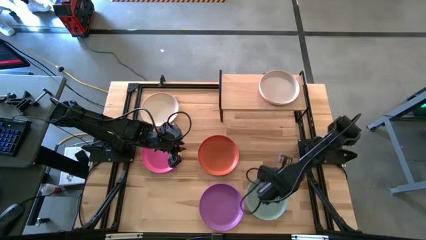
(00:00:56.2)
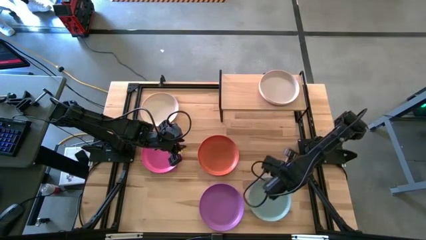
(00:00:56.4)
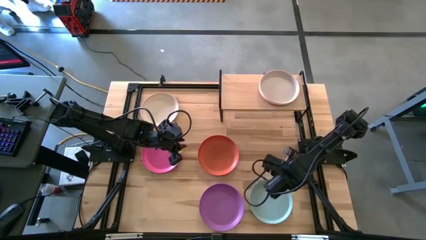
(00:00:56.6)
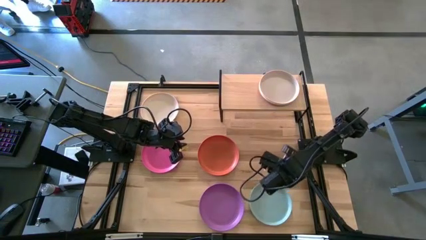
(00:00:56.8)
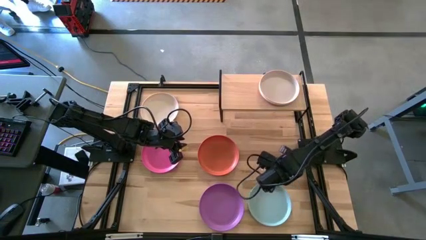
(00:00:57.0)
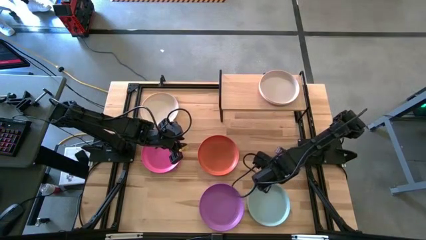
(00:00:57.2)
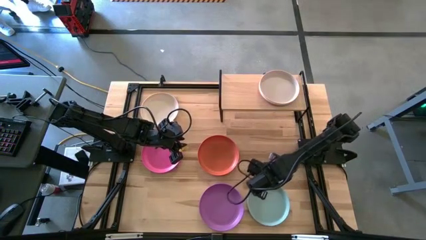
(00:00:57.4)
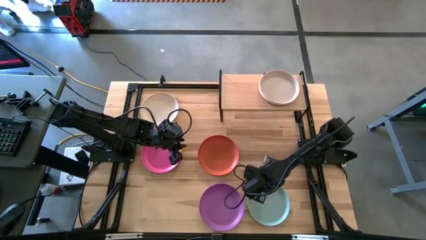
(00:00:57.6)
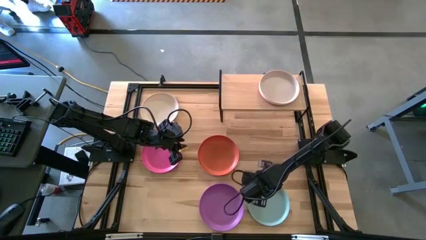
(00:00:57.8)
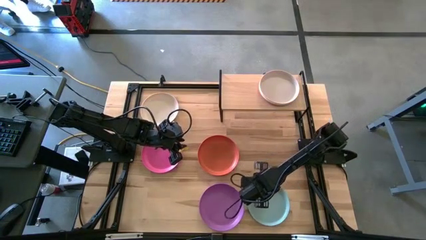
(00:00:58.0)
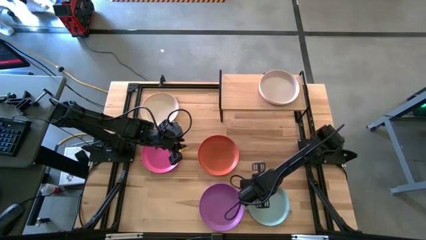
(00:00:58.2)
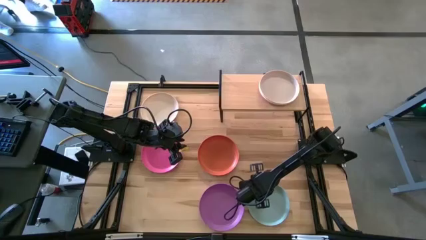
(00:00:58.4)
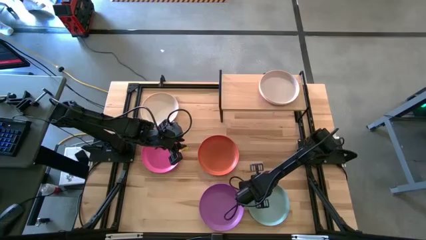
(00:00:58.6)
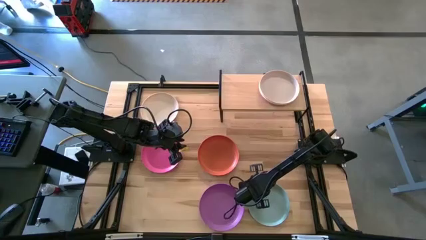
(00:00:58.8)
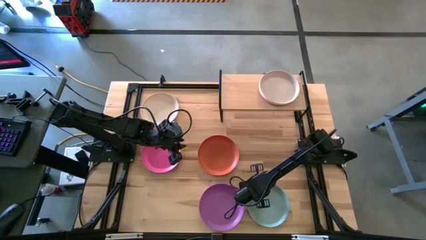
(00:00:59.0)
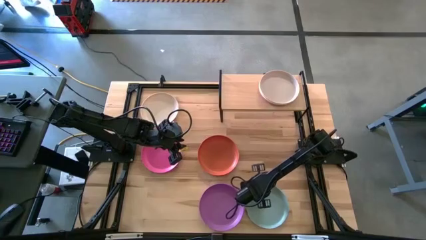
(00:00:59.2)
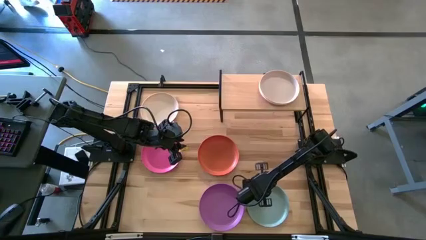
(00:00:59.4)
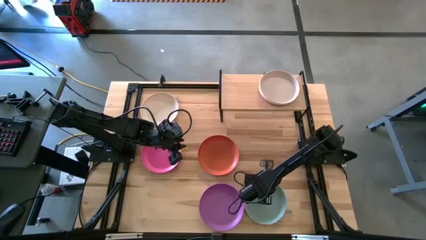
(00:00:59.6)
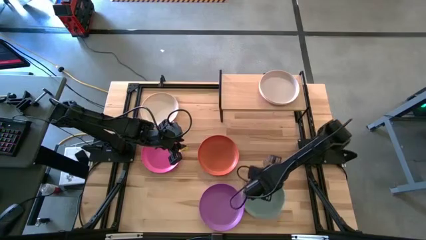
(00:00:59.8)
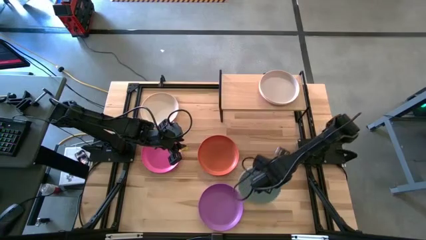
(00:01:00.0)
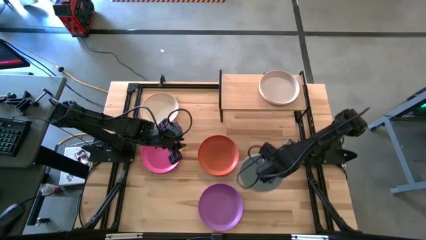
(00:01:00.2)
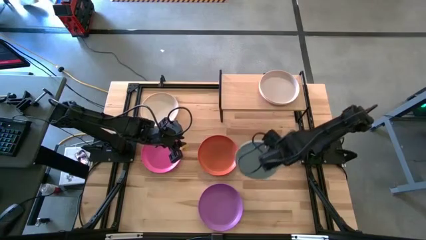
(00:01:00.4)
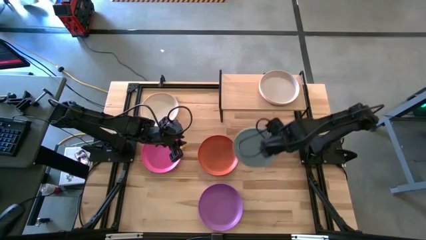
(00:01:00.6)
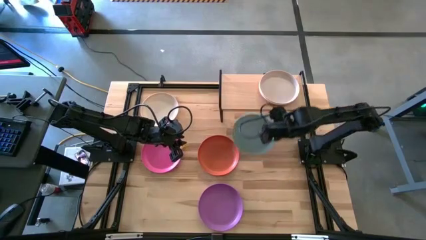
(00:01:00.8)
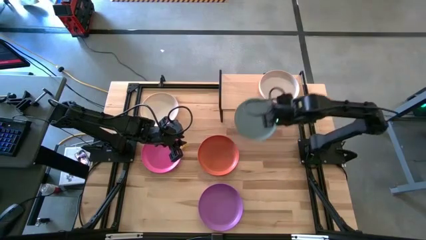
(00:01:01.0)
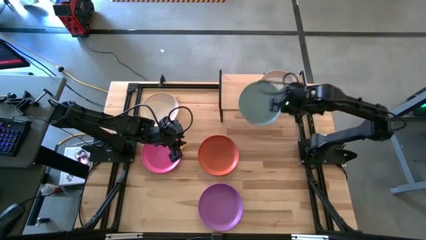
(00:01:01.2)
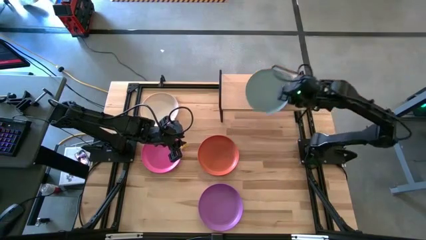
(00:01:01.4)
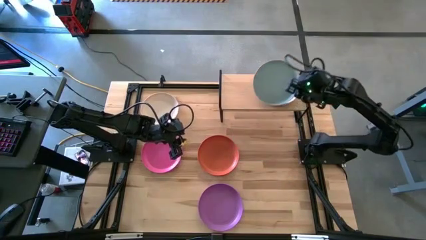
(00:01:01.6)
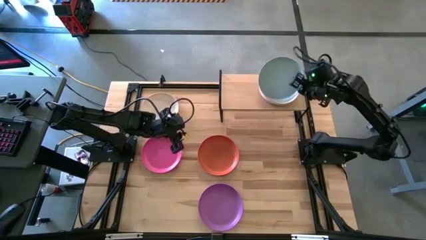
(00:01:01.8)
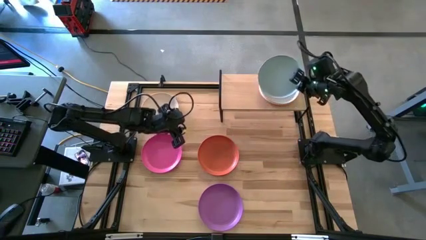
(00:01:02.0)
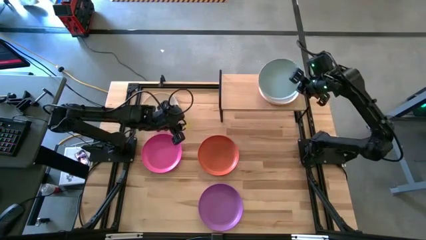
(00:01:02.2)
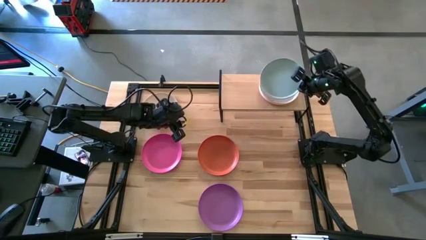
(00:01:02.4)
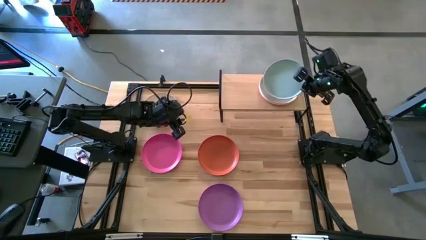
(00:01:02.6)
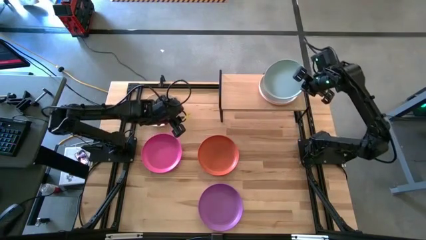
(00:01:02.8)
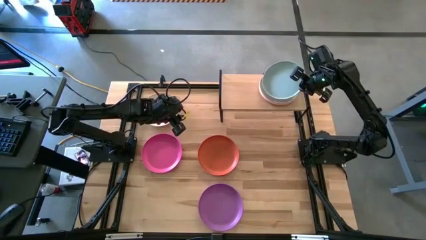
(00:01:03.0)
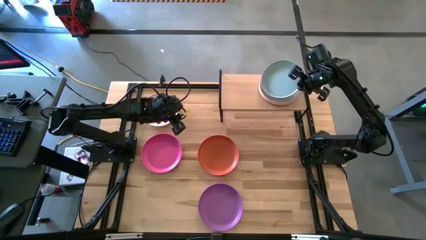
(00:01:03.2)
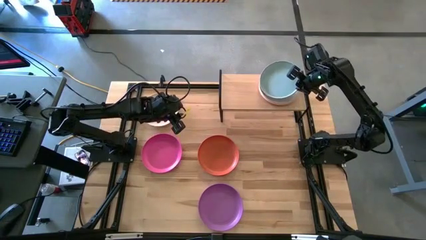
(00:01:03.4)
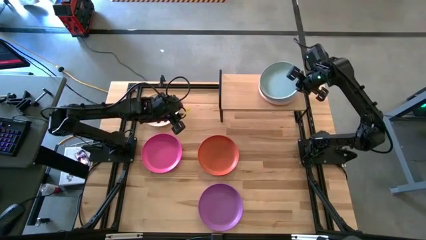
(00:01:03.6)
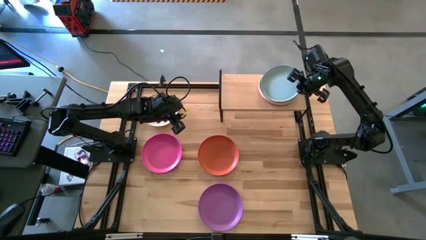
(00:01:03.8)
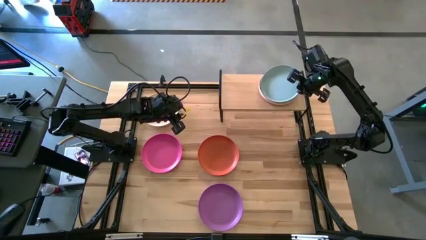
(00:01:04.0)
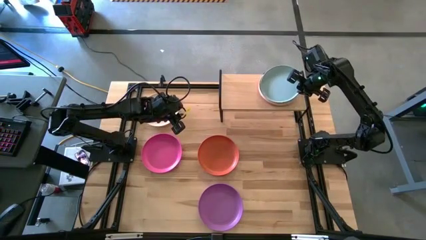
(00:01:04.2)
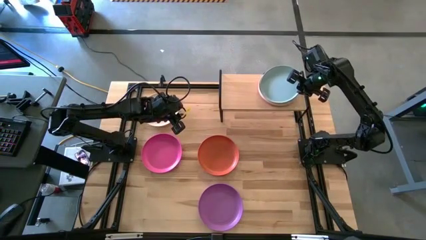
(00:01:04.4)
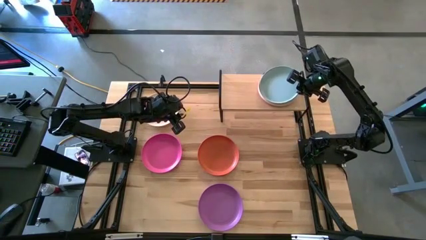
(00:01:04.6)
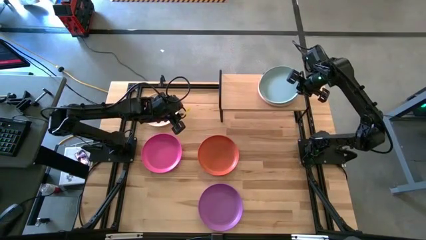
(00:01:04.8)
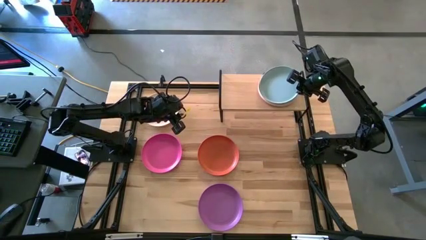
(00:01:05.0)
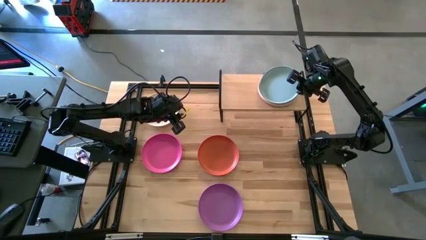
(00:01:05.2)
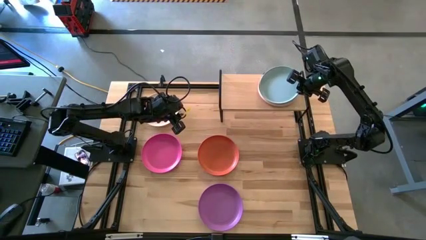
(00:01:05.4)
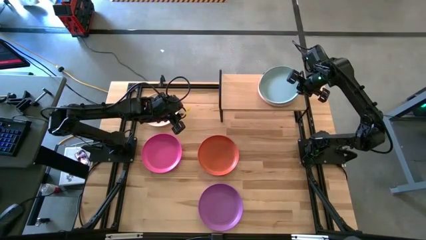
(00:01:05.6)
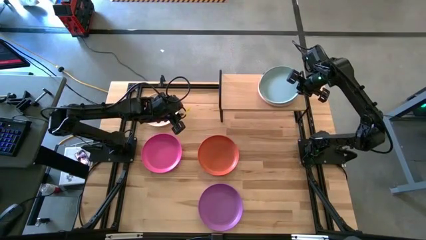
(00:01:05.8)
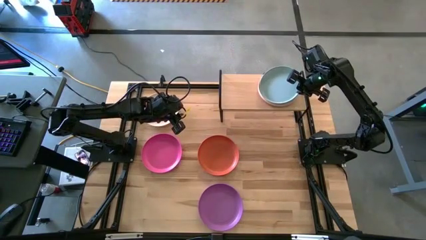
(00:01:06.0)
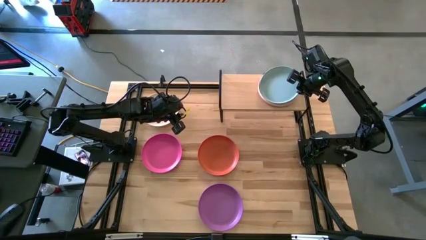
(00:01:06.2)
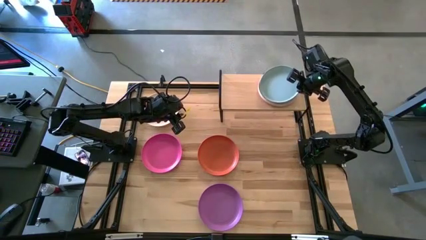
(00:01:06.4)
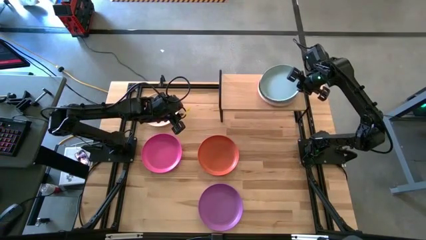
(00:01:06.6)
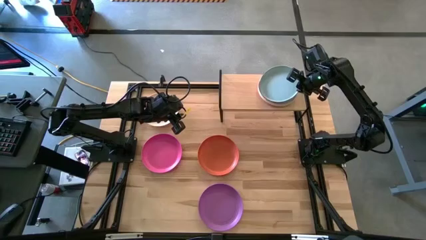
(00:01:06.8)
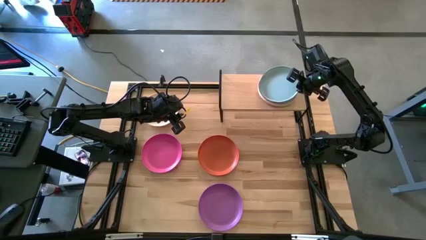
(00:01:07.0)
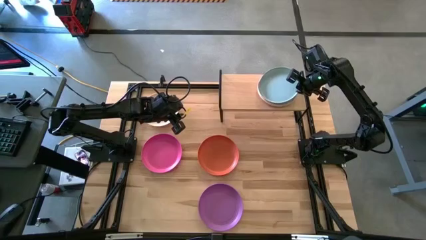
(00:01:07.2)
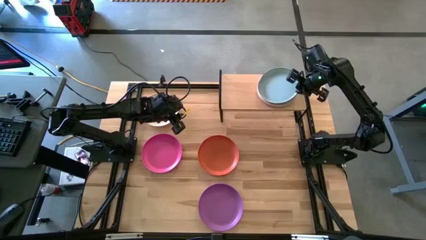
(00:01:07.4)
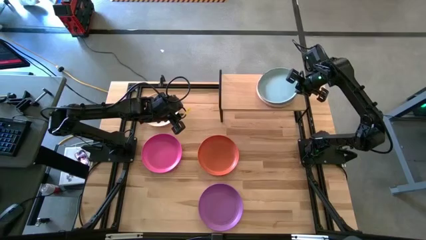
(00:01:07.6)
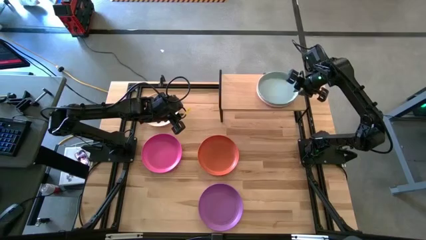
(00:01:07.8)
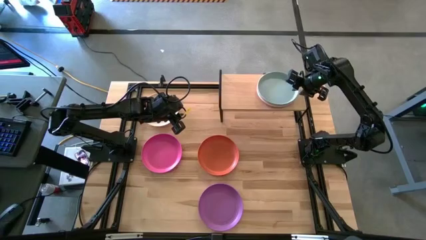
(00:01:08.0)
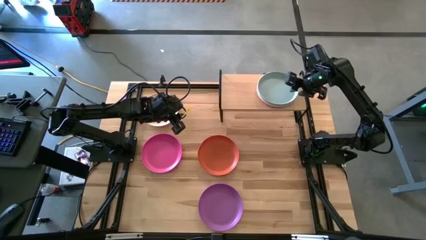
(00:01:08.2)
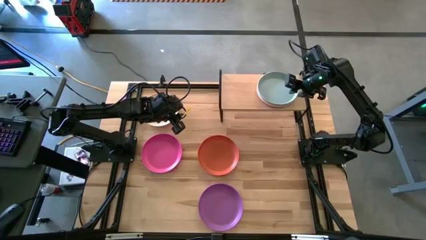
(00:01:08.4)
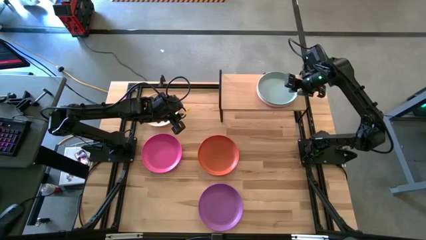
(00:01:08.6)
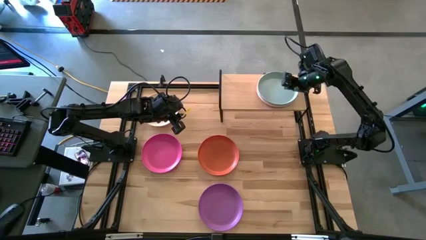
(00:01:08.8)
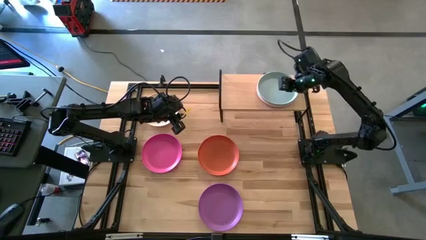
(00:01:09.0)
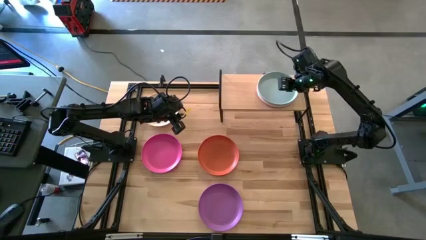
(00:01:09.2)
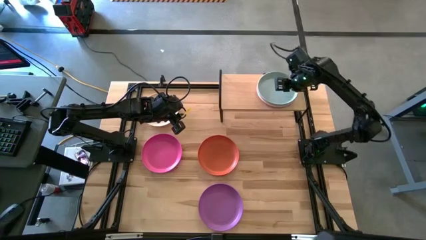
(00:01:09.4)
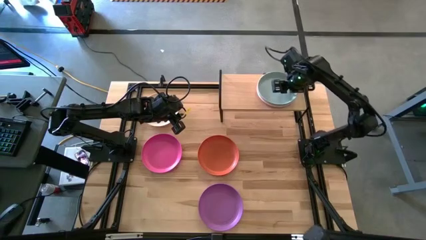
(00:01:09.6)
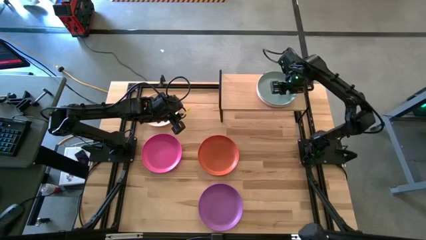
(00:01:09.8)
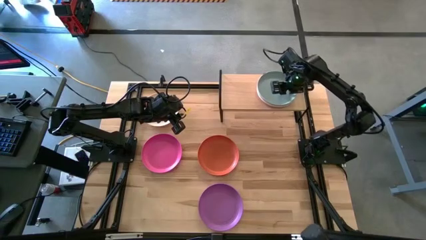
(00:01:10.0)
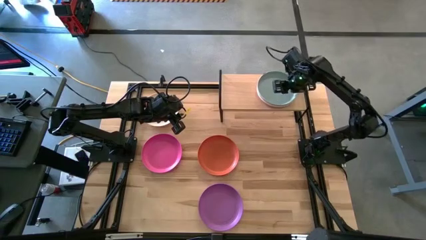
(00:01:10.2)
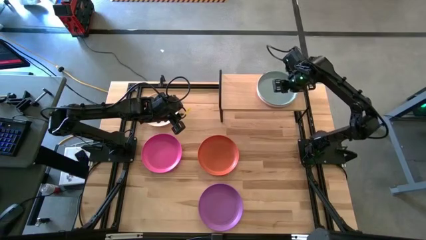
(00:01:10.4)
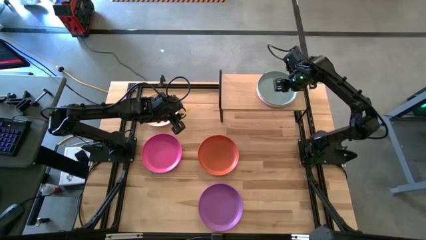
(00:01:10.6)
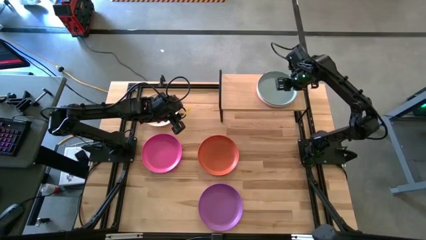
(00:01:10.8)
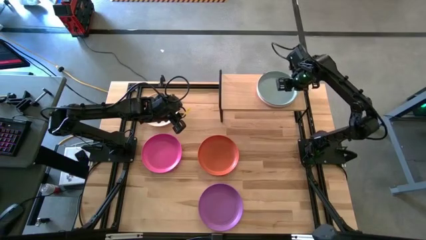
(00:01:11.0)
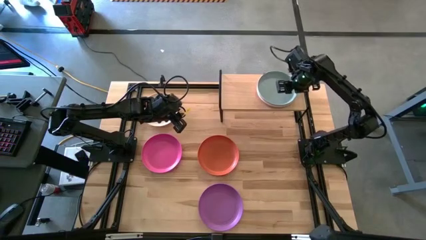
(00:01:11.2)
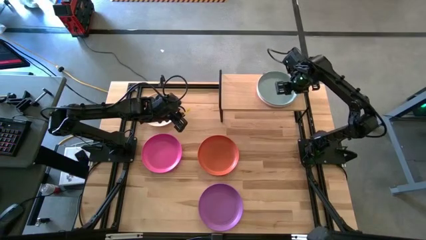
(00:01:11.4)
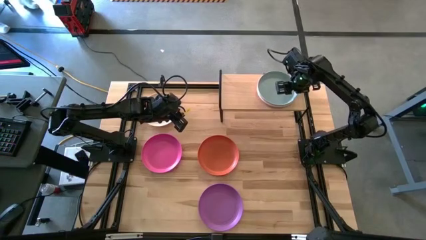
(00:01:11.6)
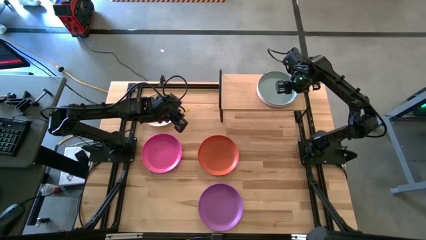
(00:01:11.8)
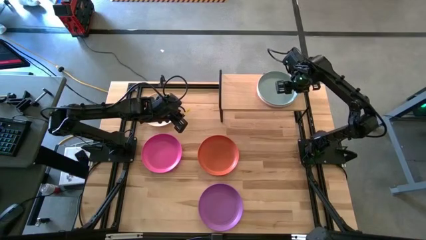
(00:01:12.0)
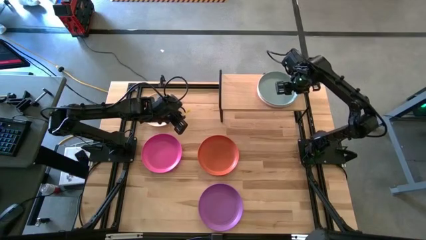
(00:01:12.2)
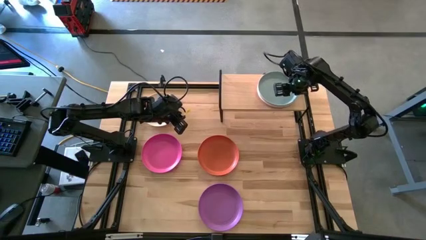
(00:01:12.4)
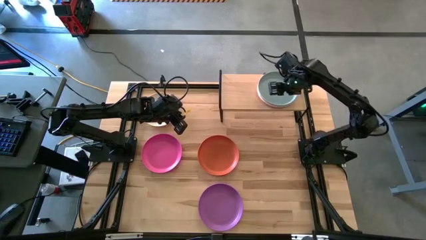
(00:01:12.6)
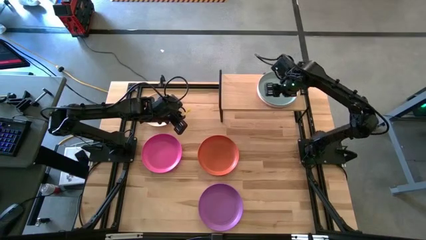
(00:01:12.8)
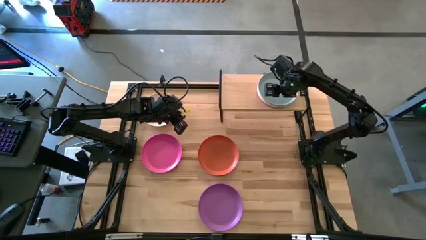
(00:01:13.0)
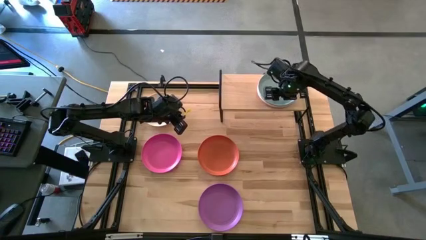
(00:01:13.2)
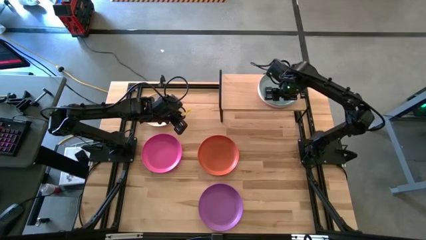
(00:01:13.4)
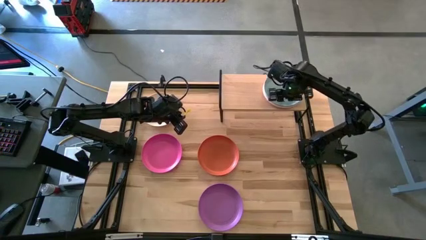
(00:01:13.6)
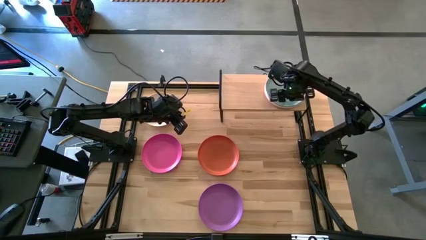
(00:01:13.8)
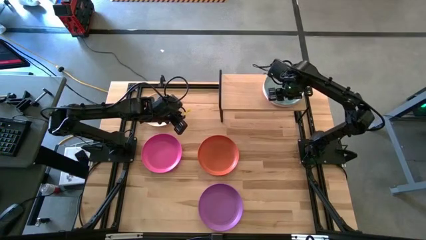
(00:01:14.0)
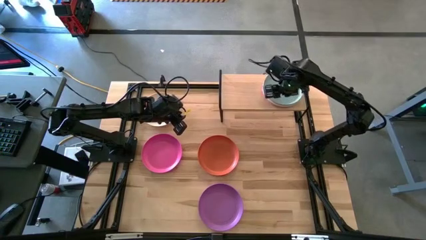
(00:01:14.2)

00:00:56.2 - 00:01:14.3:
Task: Place and stack plates onto a shelf
Stack the light blue plate on top of the gray plate on the shelf
